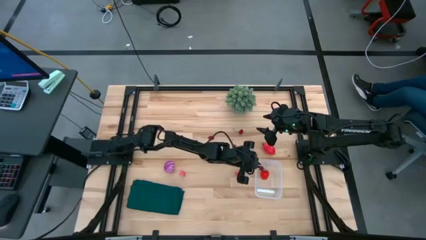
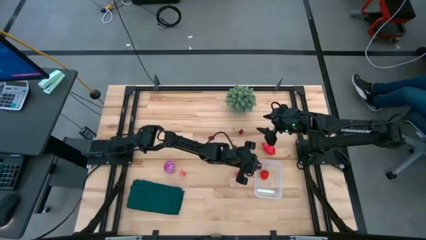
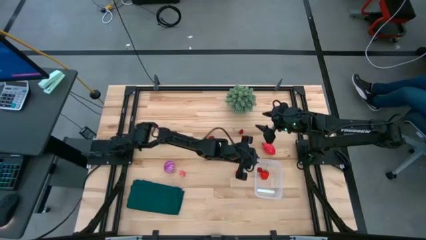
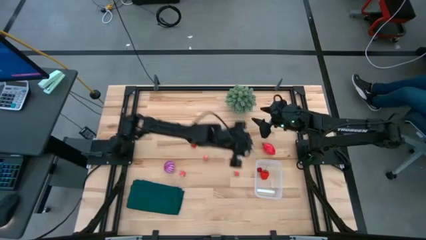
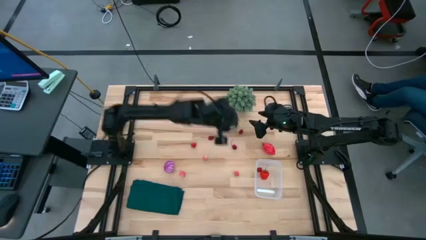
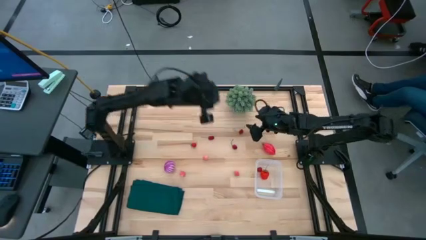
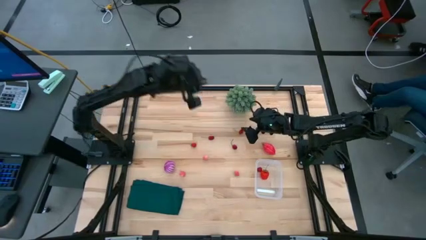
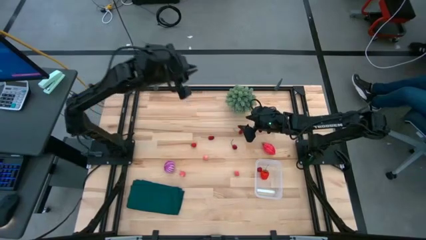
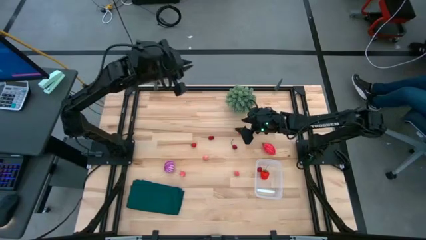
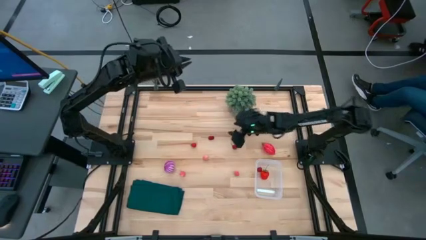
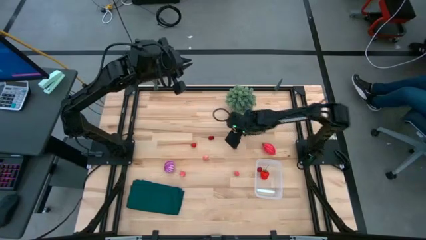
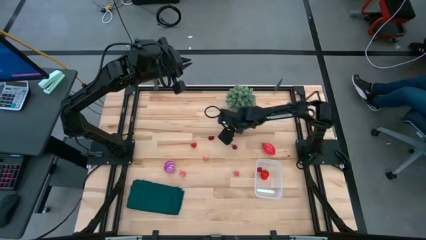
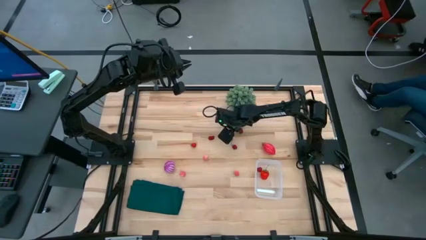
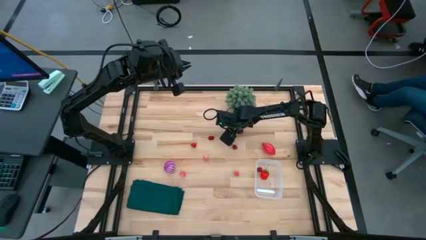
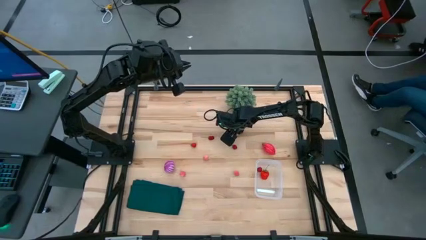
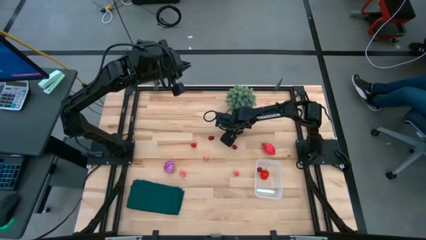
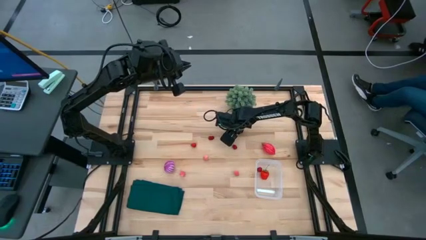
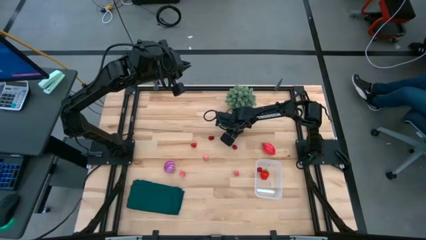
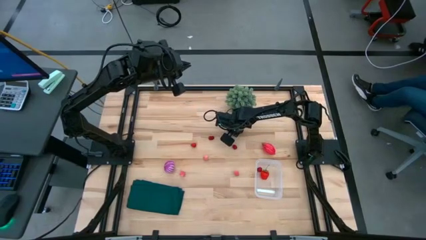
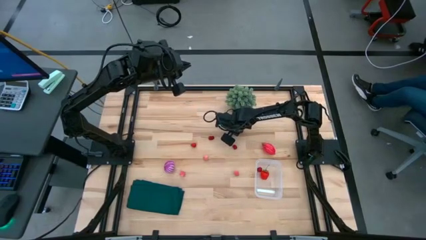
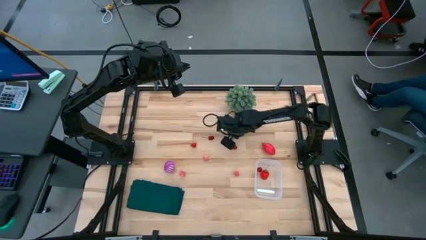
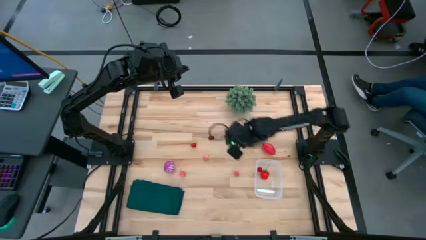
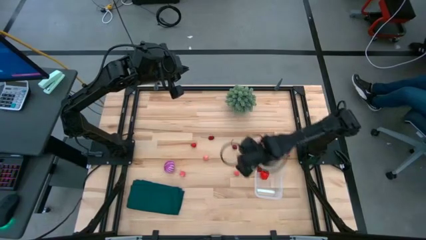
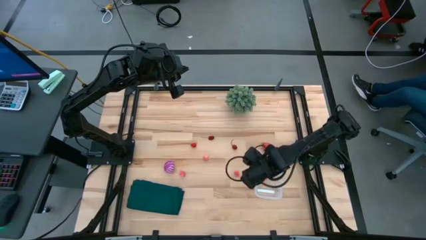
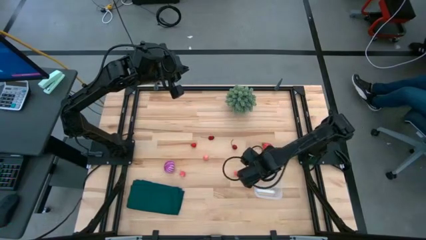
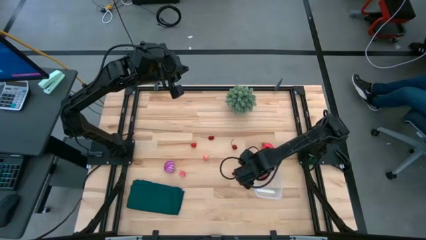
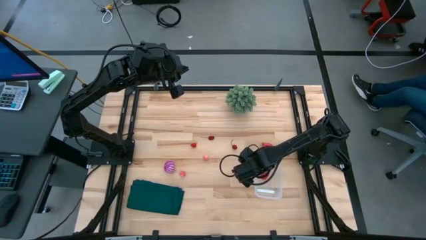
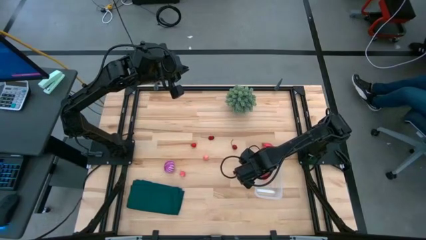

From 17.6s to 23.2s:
Task: Pick and placing Produce into tupperware
Put the red cherry into the transparent bin

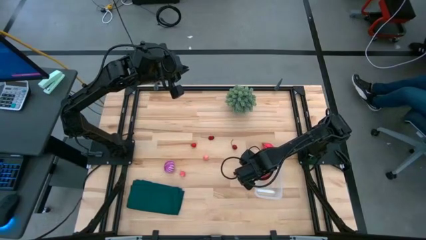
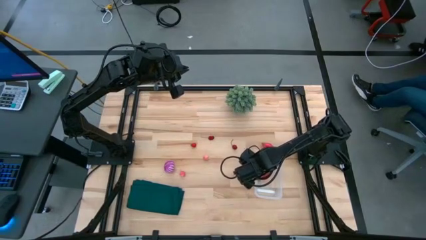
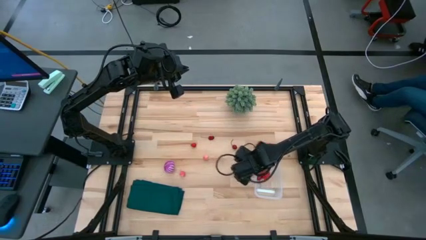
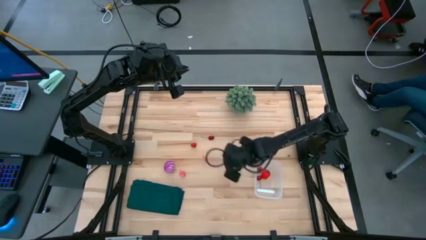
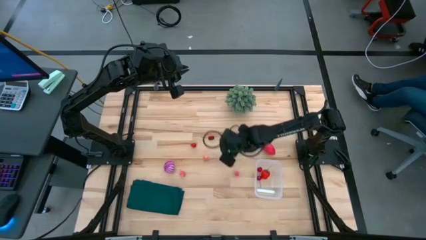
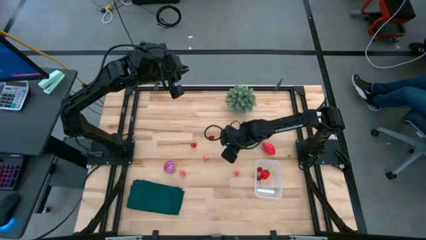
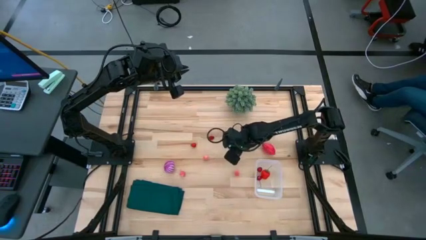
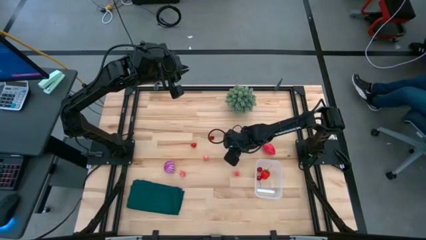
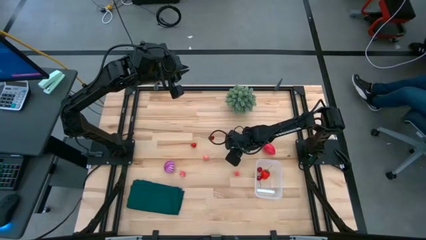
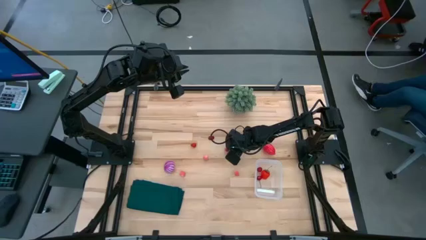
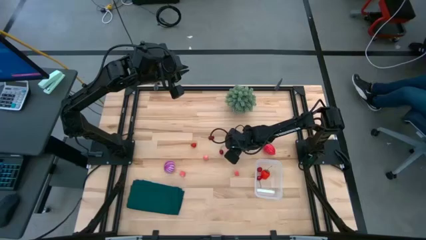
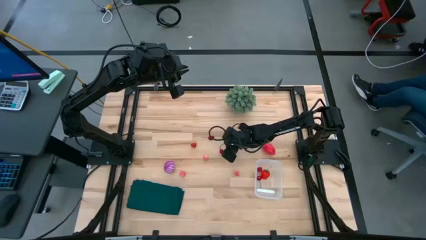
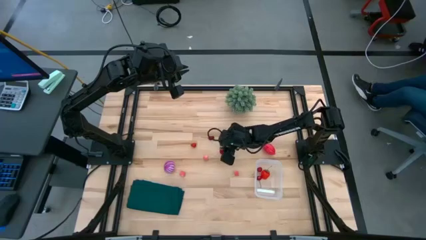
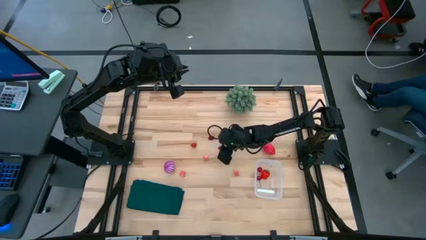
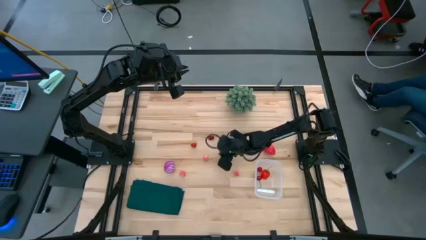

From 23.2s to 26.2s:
Put the red cherry into the transparent bin

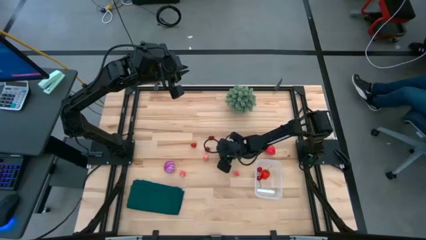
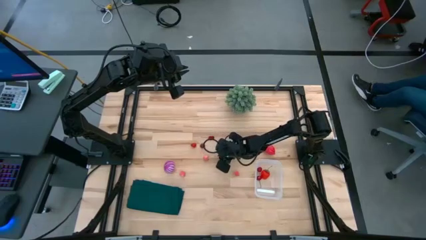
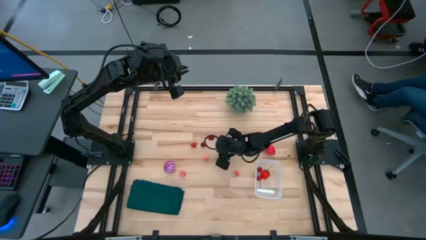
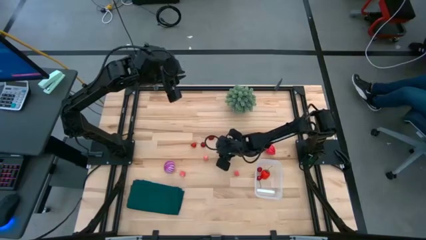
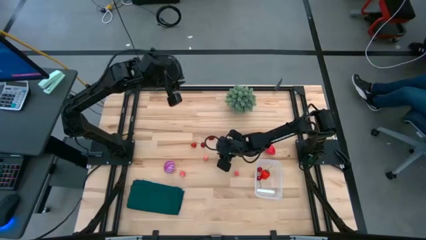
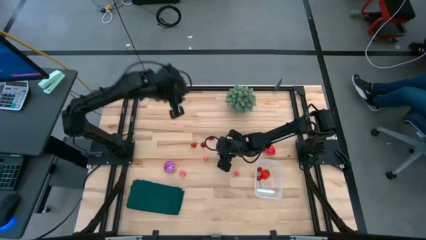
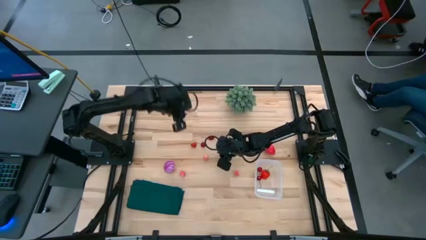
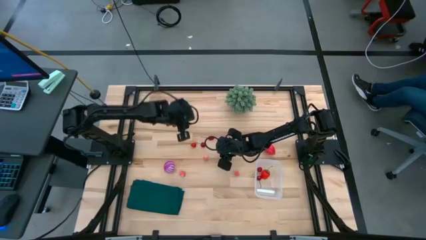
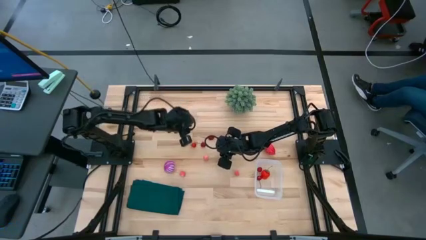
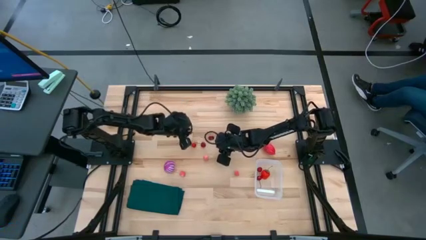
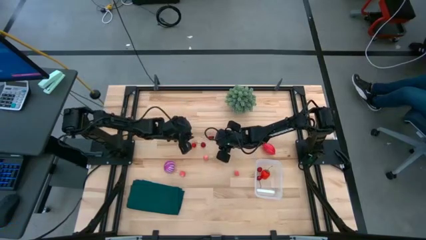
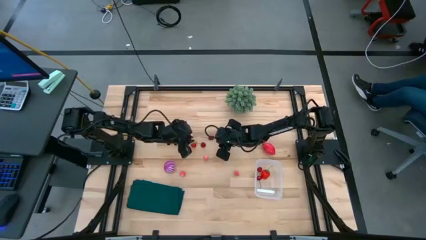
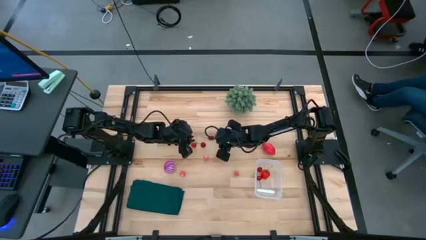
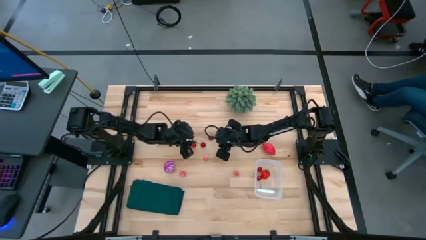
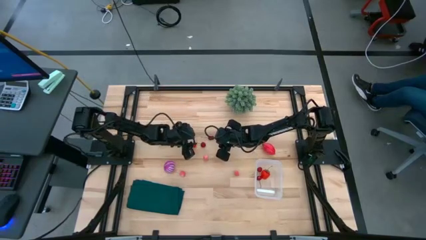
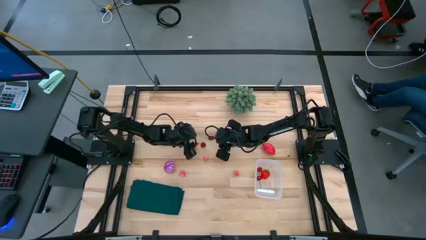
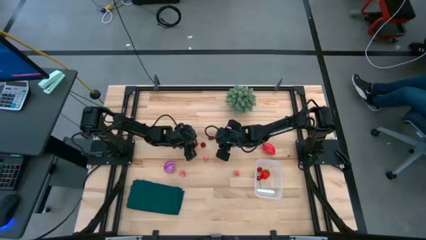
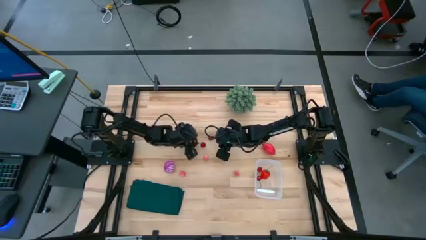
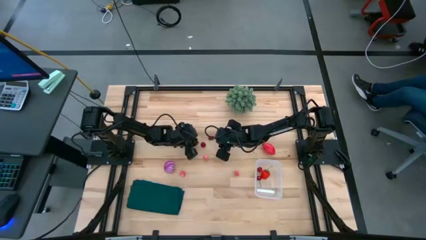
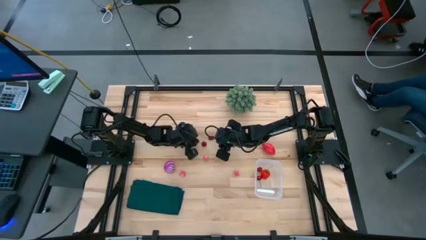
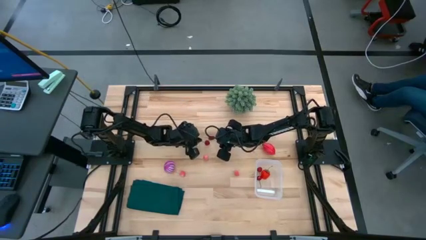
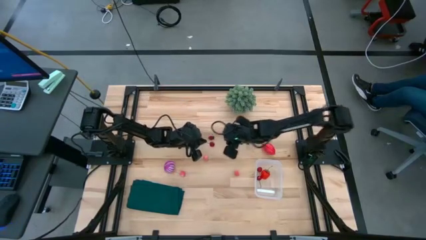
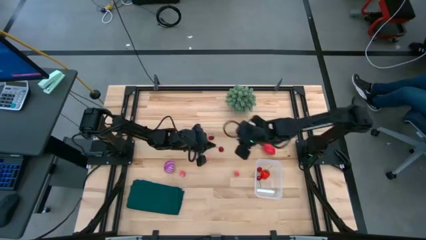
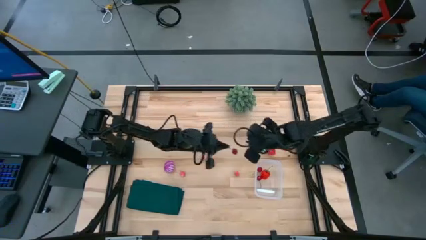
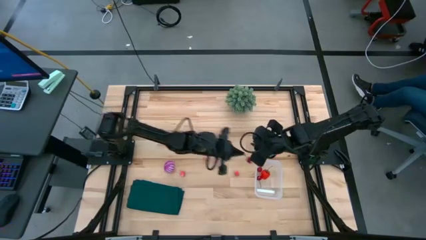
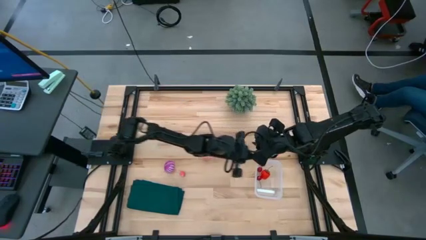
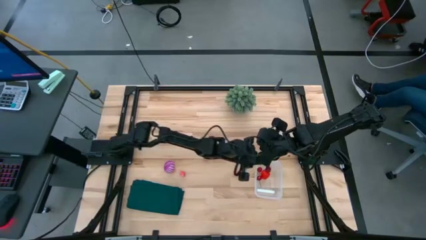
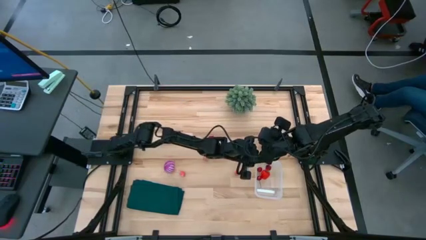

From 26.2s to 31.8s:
Put the red cherry into the transparent bin

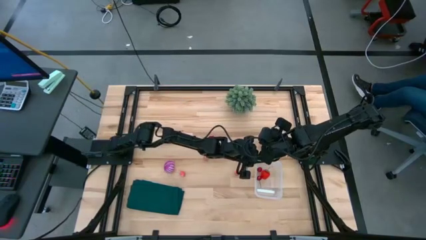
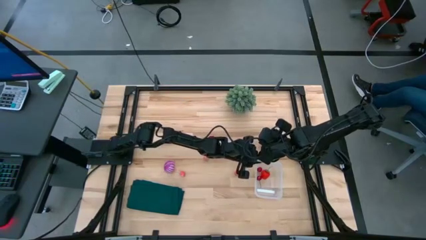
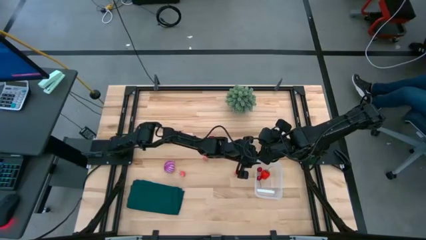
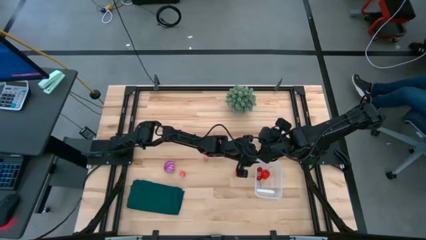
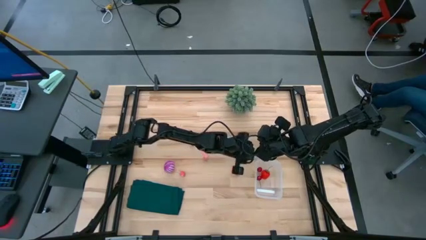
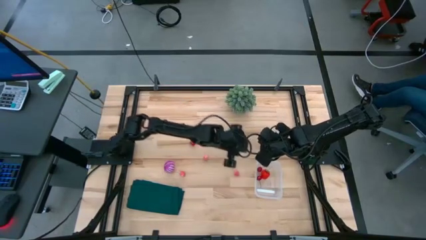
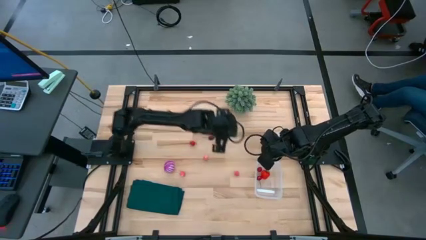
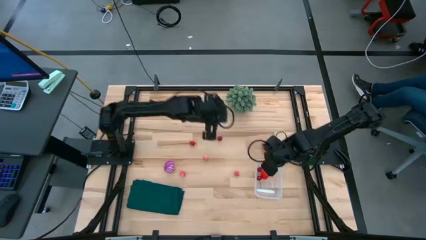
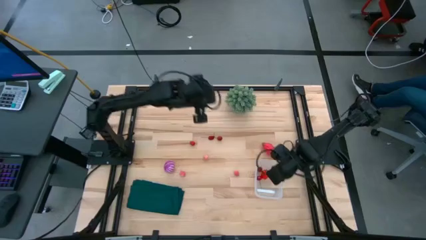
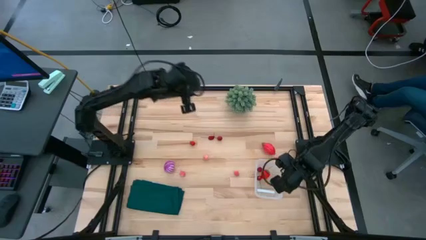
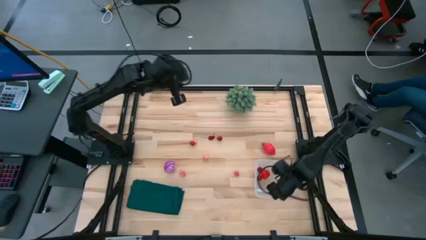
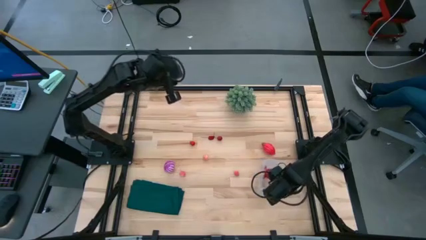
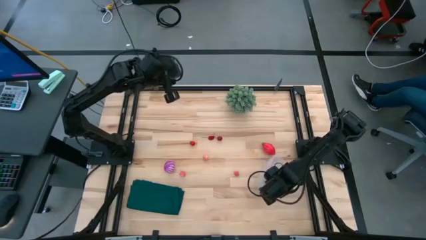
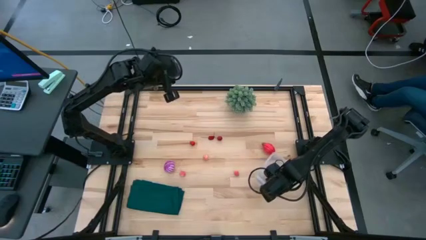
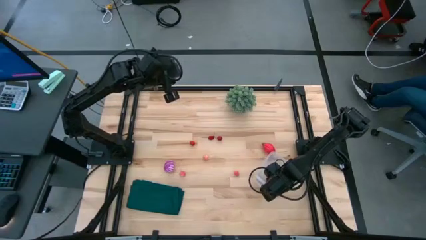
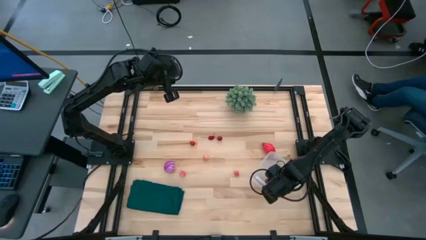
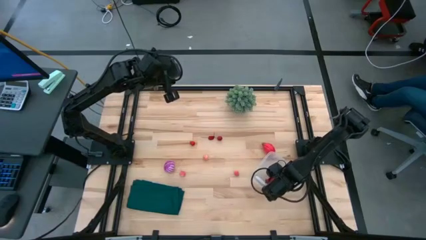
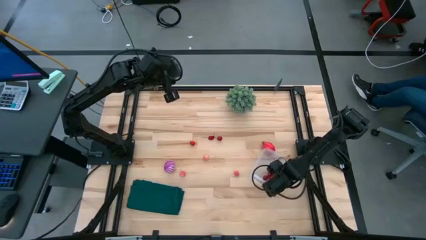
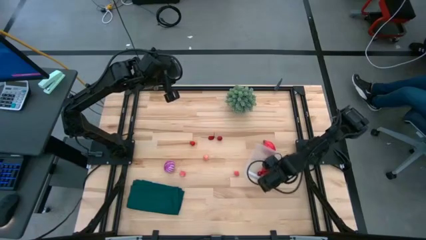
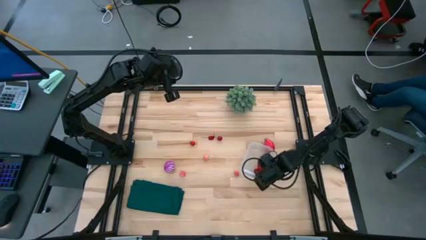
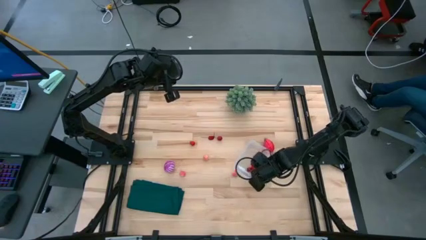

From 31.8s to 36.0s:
Move the transparent bin to the middle left of the table
